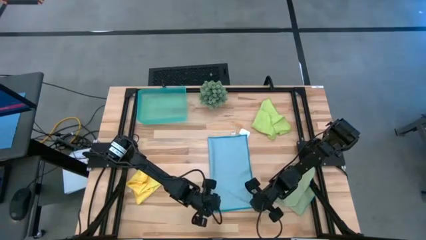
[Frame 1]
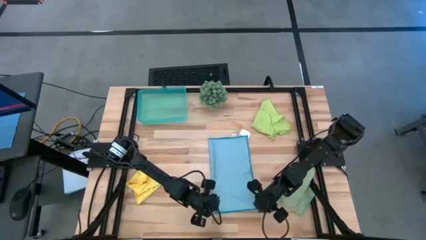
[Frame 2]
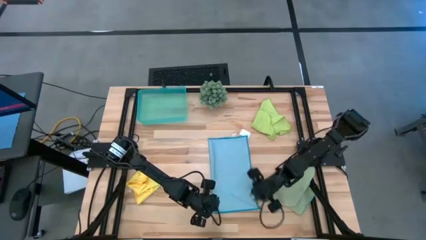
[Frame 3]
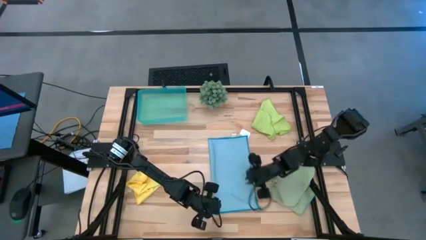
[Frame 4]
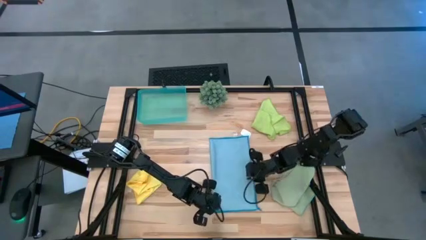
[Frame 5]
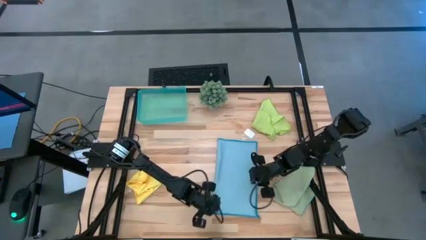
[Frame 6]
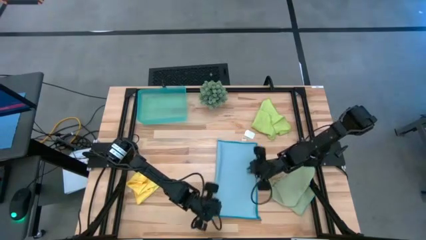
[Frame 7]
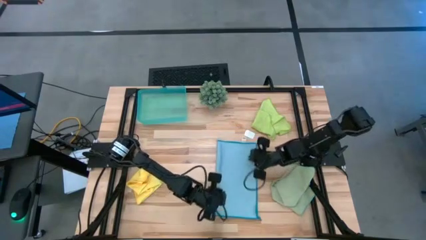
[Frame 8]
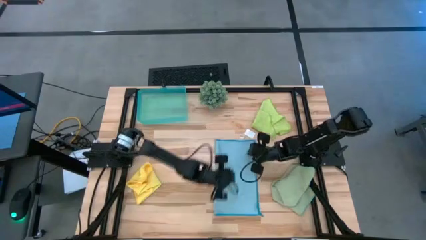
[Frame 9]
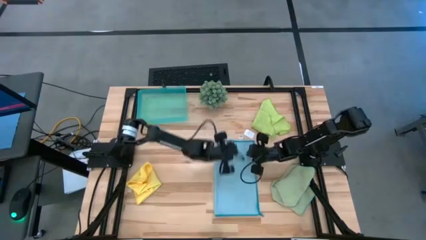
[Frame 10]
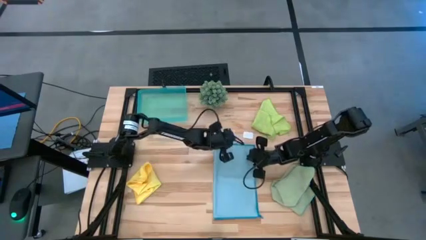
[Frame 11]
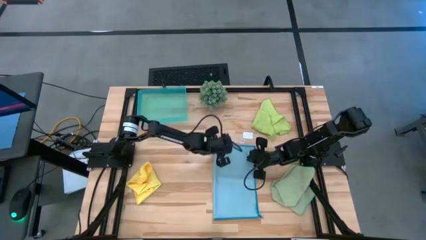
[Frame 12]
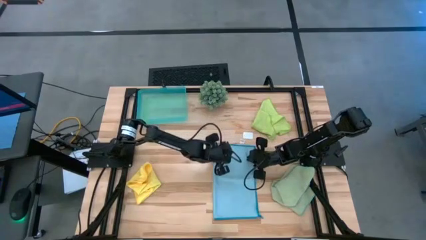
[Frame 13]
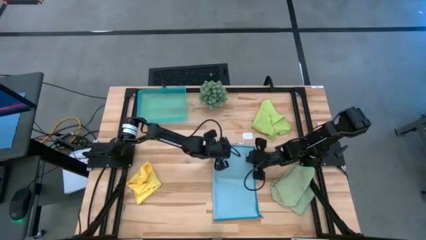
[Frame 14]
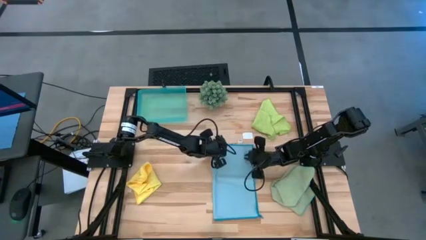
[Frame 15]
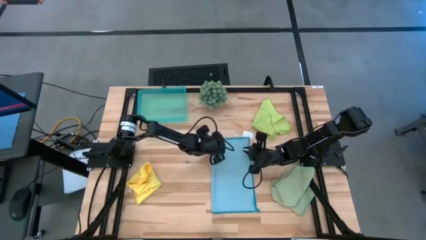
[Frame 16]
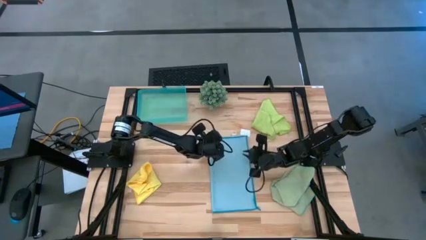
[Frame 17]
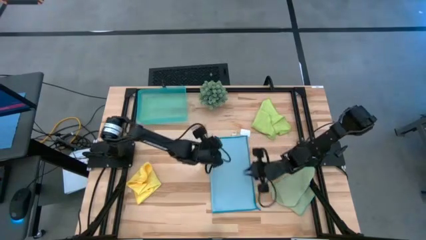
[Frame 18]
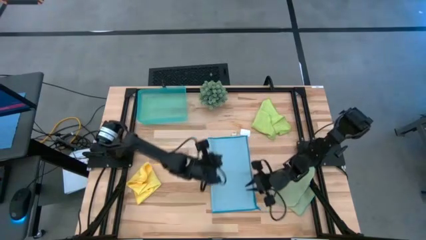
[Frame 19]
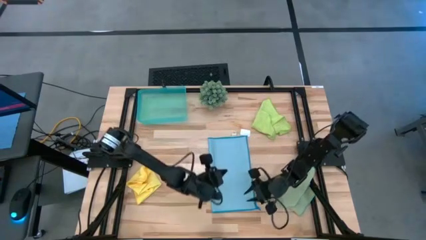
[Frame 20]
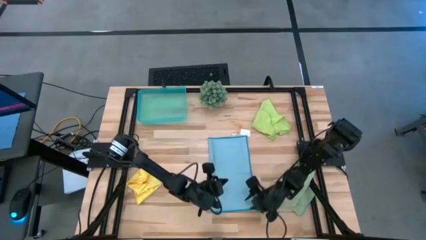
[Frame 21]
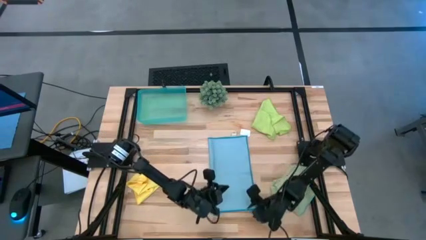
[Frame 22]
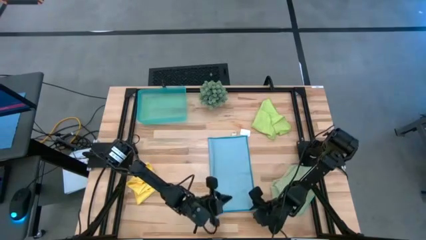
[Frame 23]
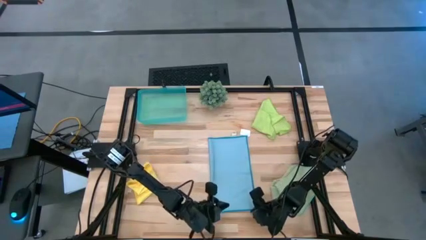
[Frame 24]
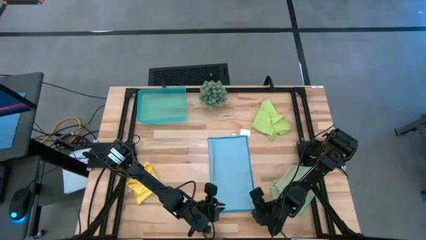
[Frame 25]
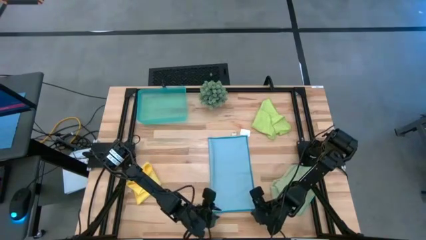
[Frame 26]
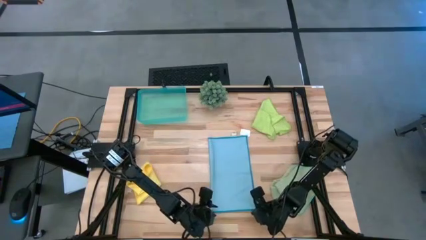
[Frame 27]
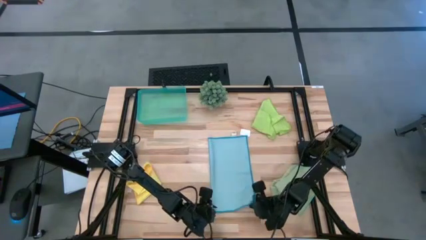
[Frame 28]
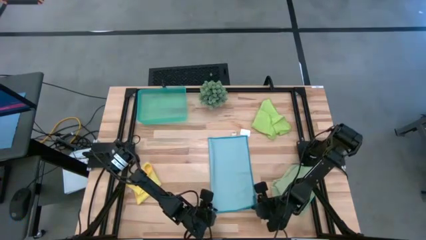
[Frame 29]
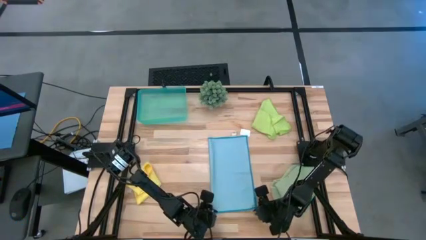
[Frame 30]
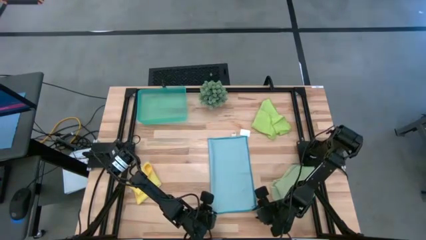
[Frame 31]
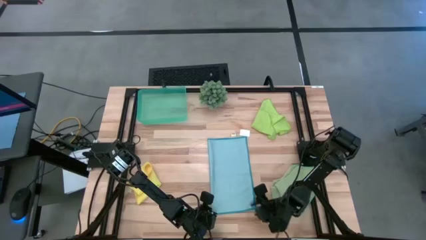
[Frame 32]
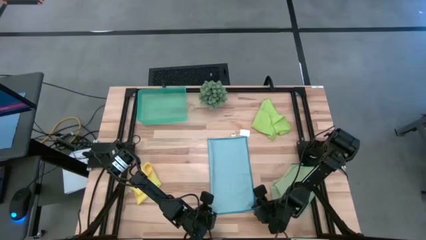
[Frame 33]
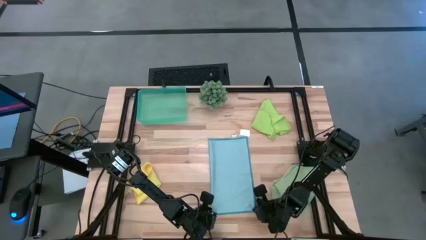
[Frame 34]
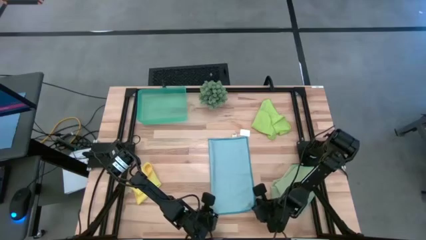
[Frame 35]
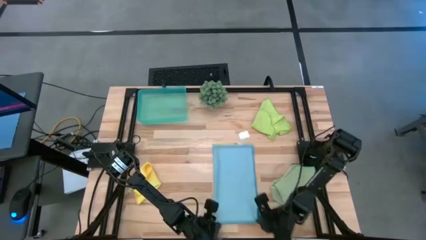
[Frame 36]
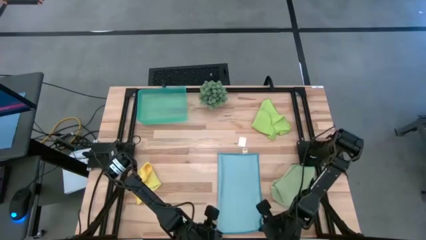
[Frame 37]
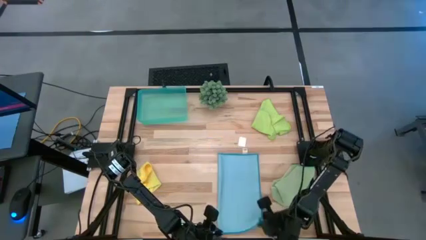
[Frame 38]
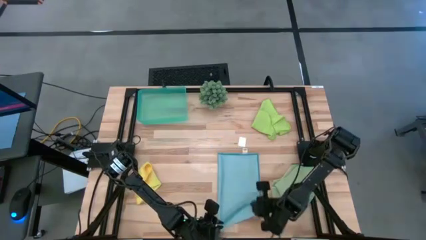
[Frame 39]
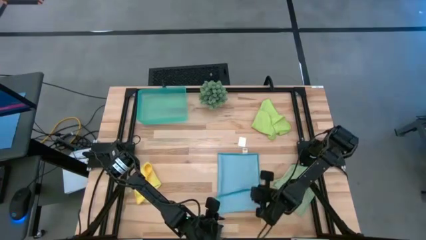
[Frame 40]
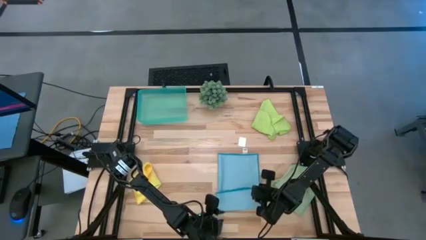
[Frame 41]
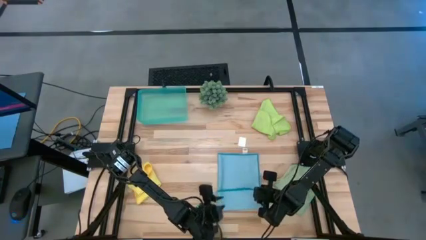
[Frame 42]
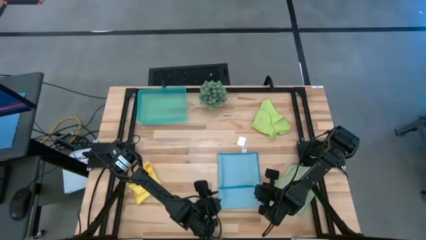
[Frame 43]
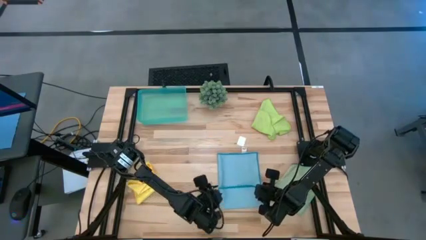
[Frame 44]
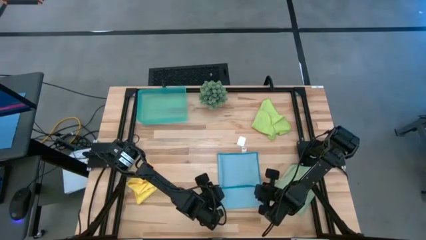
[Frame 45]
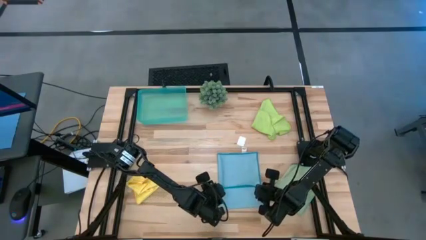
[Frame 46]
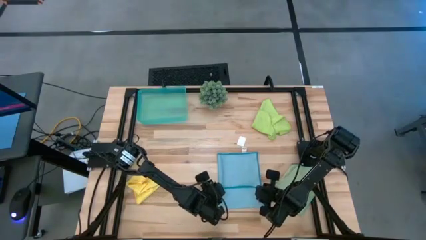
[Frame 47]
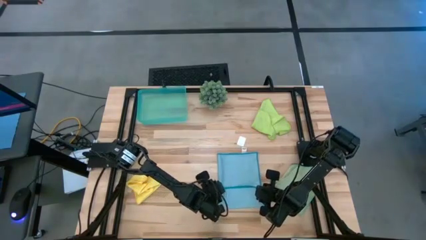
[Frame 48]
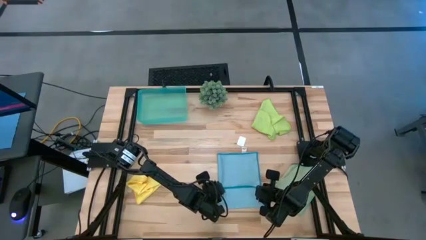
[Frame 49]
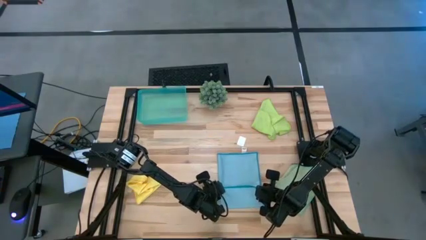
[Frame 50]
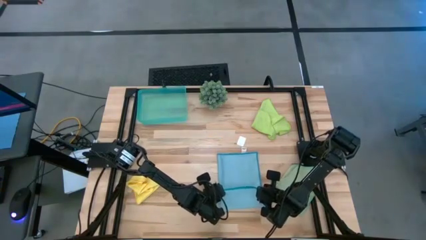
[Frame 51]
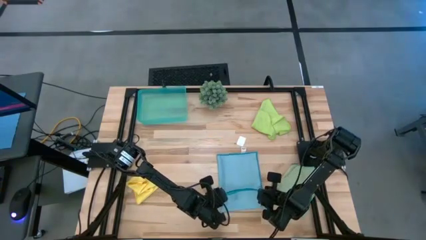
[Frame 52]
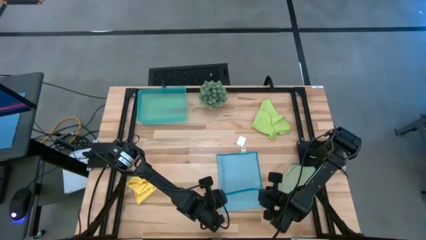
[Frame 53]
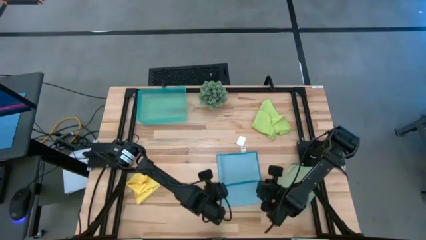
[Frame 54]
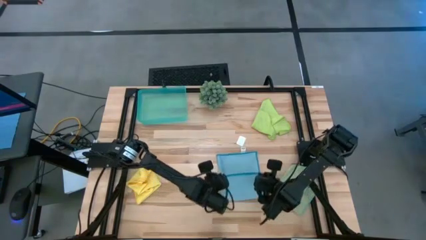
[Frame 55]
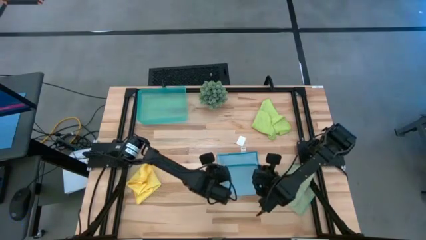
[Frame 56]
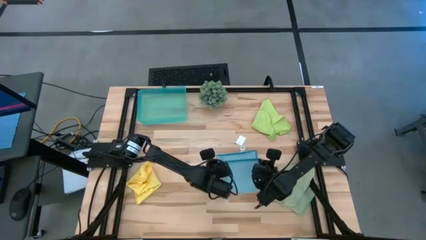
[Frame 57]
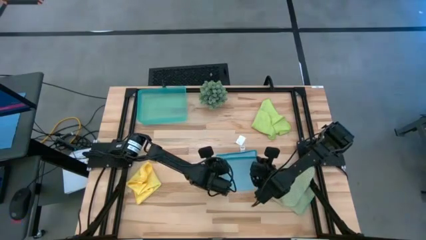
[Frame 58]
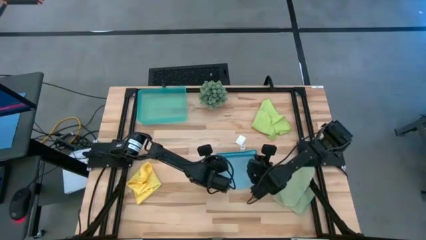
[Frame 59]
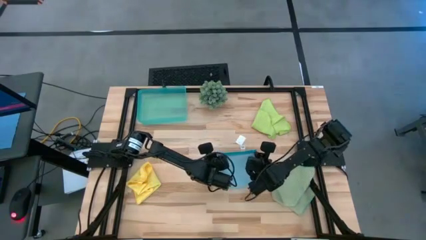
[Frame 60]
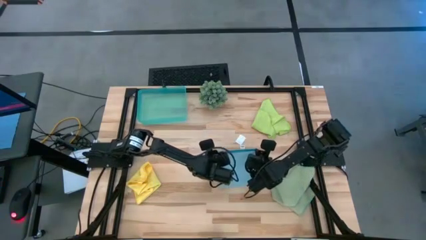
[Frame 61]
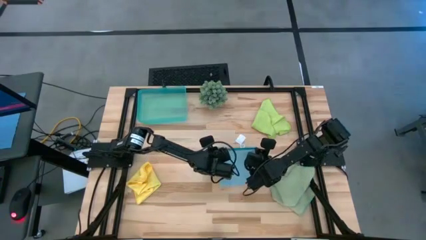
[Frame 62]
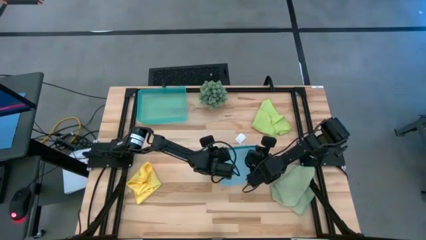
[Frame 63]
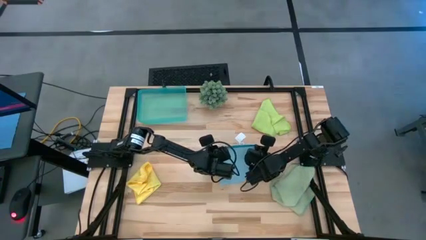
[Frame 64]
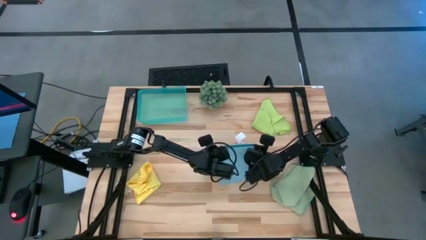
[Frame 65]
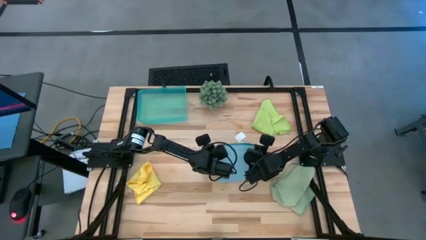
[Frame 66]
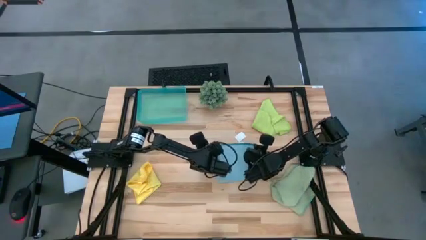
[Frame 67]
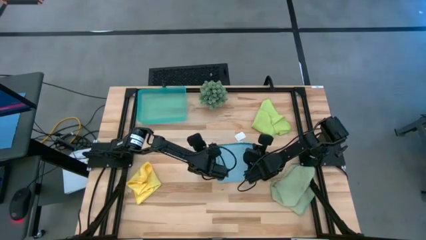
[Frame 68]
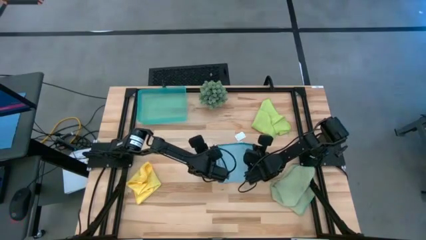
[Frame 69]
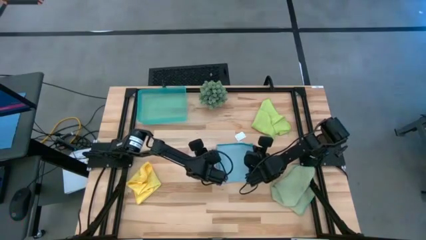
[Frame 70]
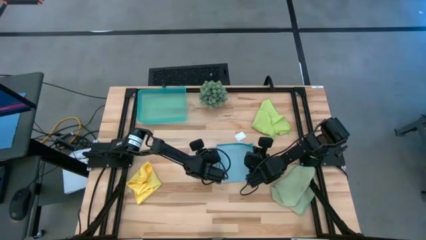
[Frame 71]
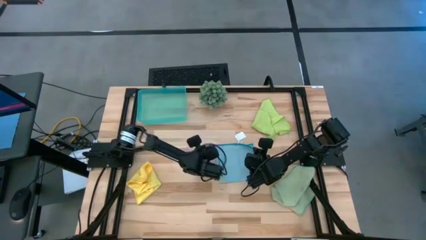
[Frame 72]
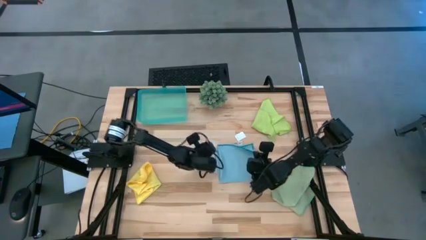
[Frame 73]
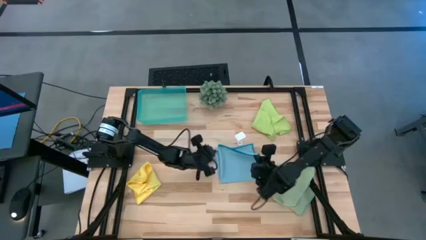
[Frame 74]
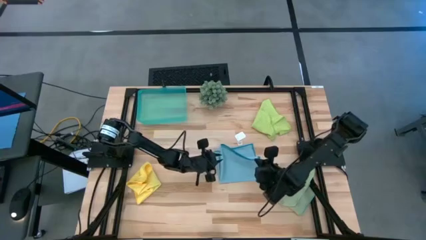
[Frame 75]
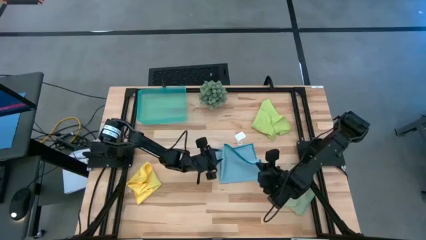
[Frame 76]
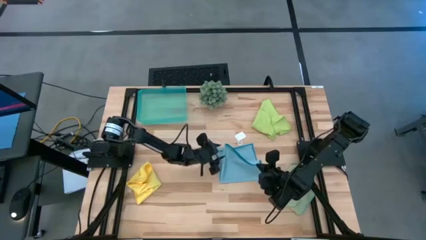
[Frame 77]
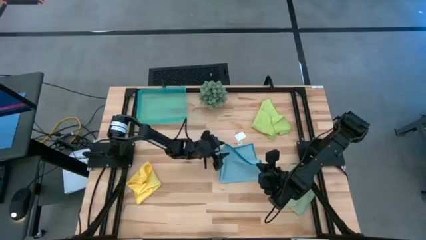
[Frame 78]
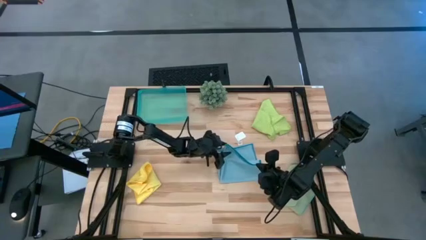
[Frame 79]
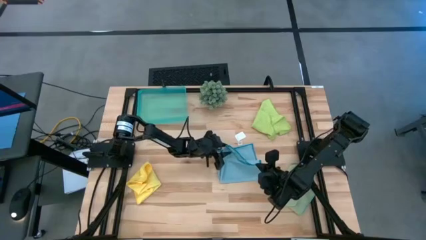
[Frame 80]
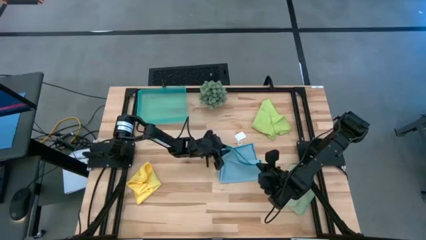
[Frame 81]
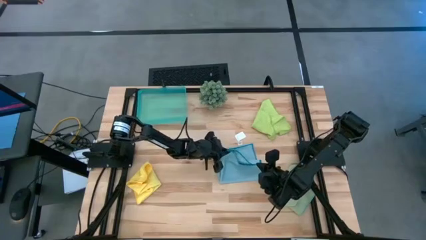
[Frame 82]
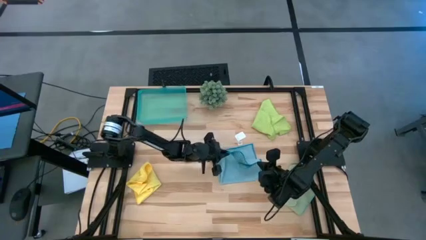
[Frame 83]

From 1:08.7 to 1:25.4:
Task: Fold microfiber towels
Fold the blue microfiber cloth
